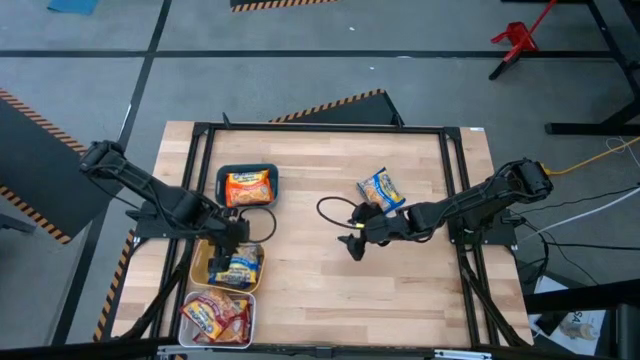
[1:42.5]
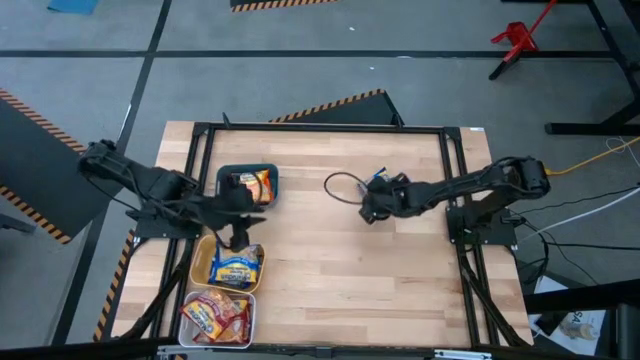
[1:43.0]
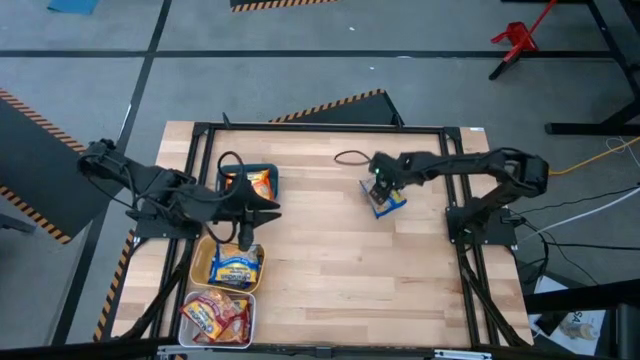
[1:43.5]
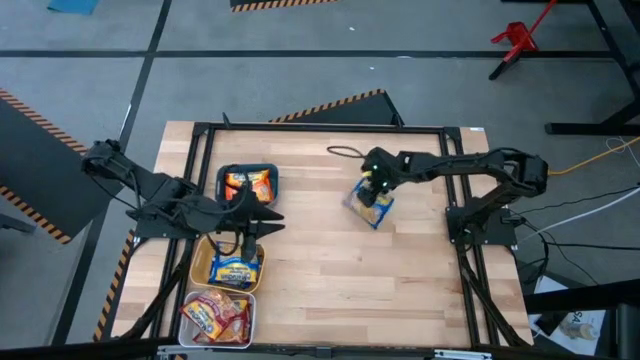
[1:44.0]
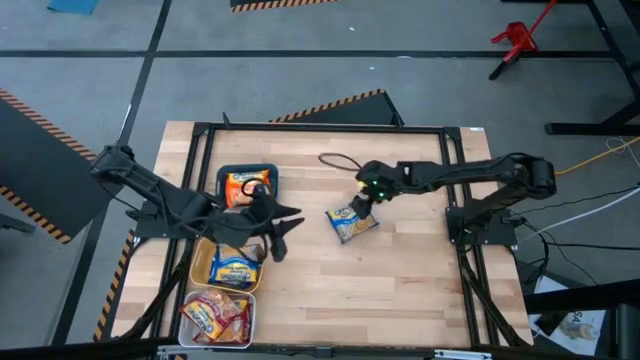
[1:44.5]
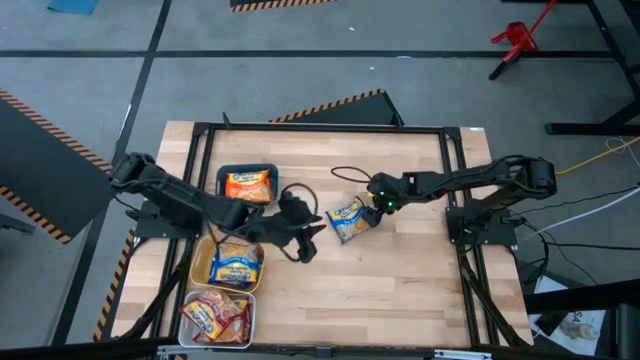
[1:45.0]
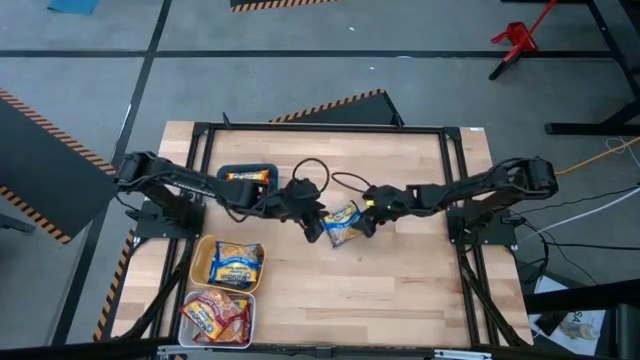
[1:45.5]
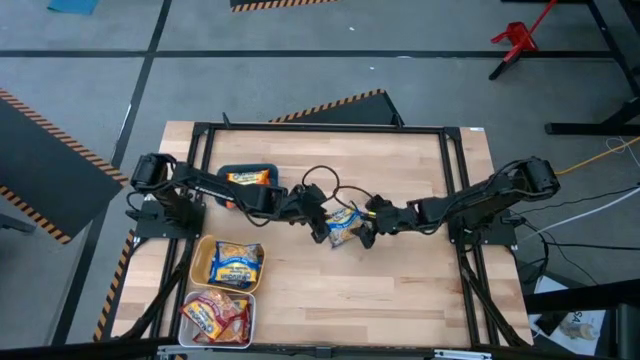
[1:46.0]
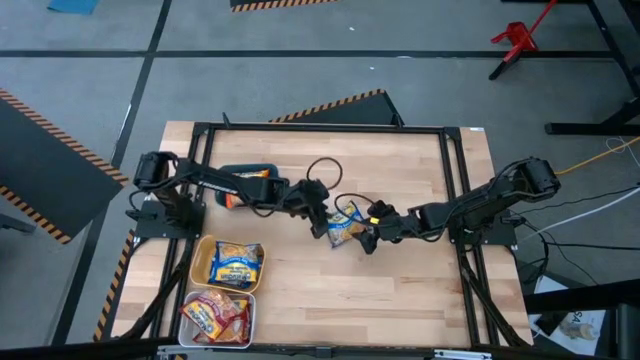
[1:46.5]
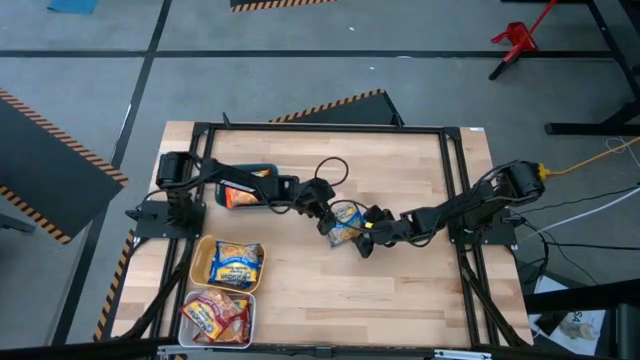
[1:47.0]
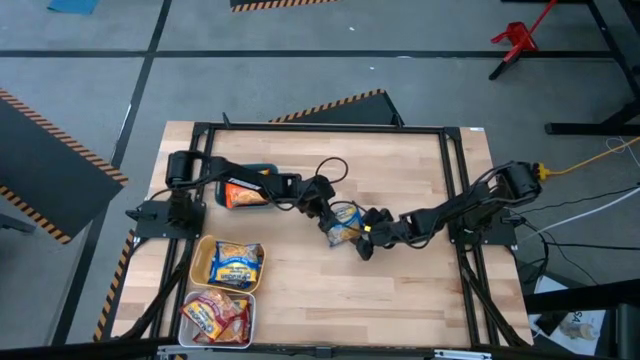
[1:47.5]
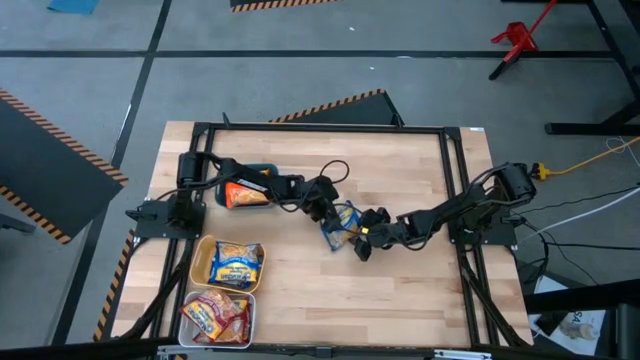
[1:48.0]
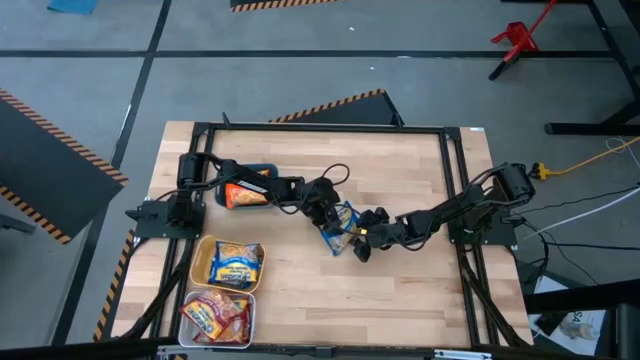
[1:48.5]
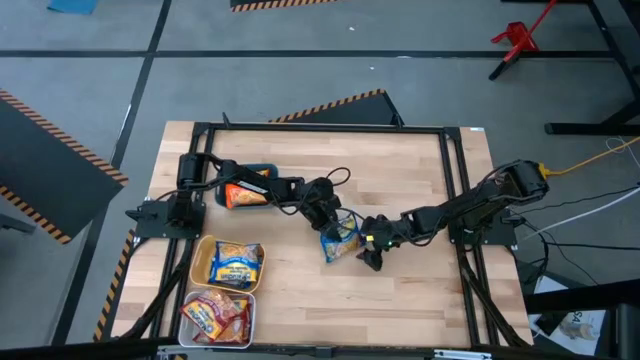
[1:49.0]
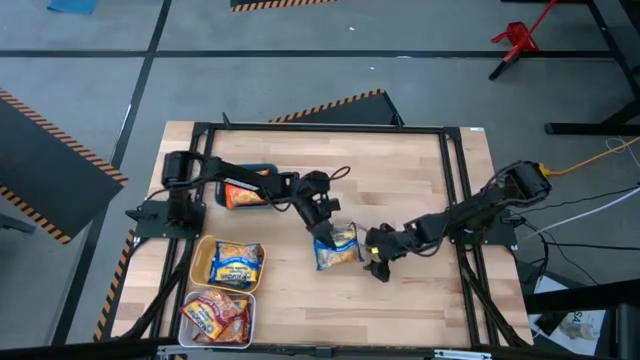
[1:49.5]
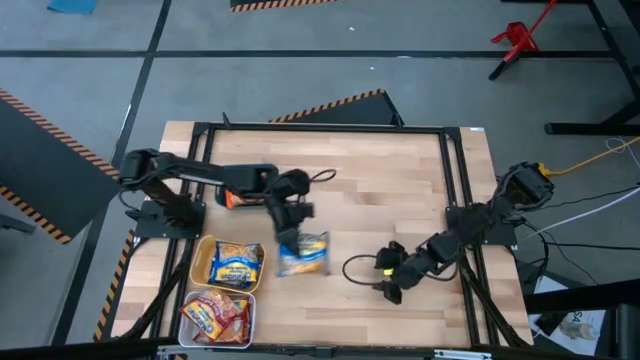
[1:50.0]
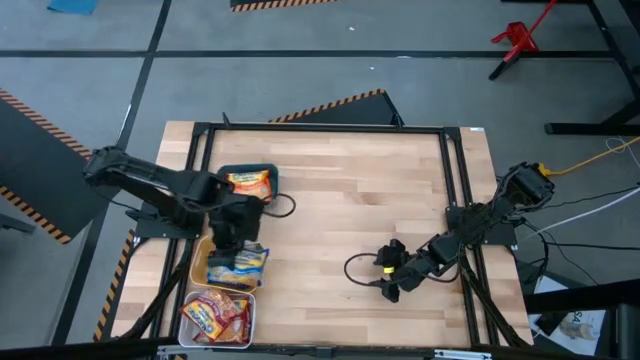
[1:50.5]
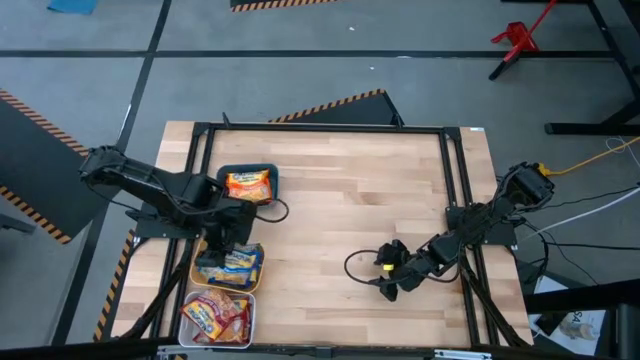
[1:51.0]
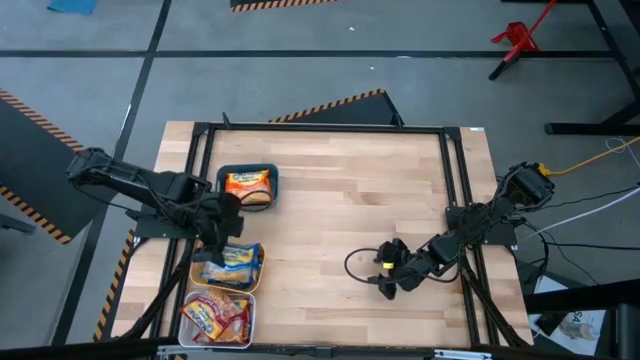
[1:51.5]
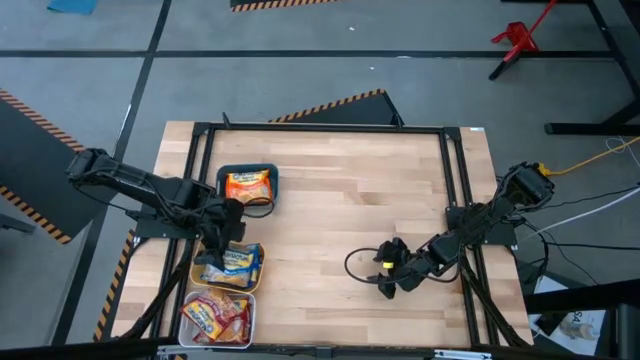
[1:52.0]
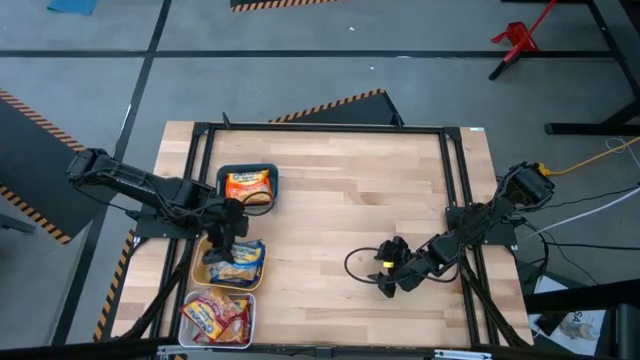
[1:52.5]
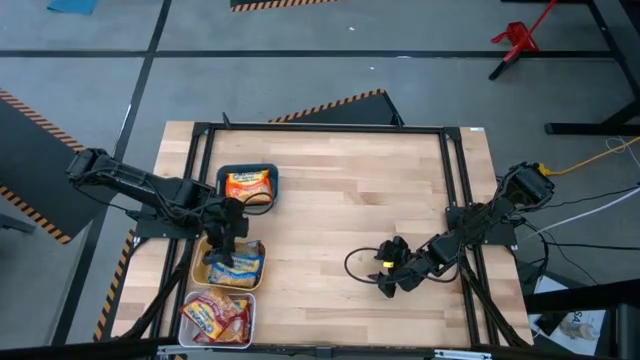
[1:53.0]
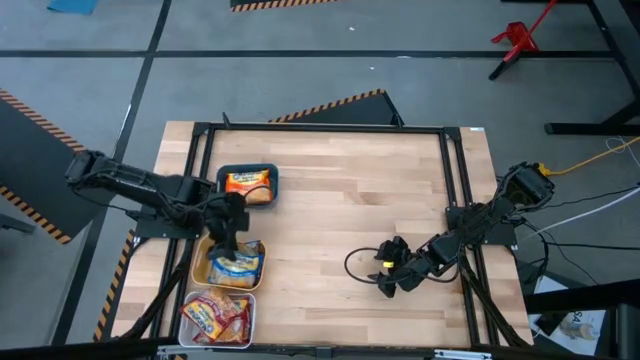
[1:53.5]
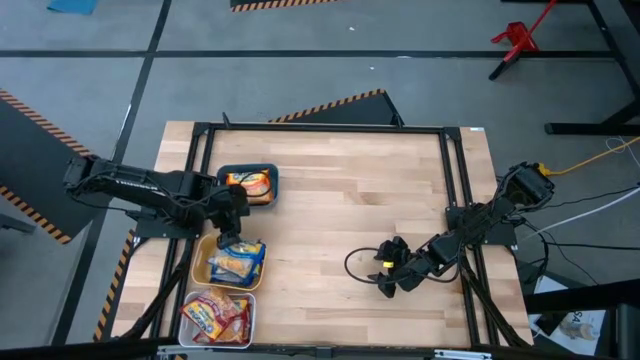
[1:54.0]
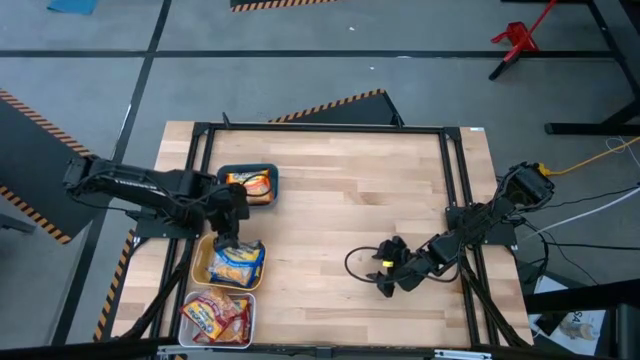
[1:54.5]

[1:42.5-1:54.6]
Task: Sort Maruchan noodles
Put the blue noodle pack into the yellow bin

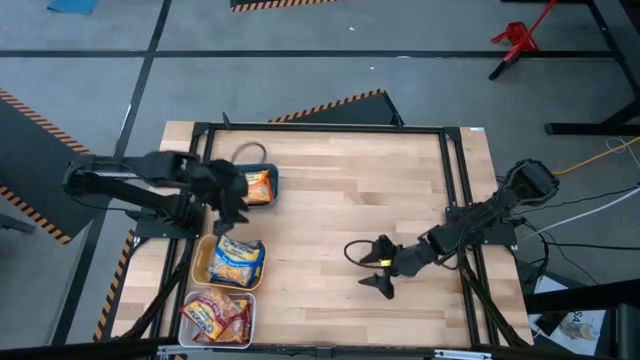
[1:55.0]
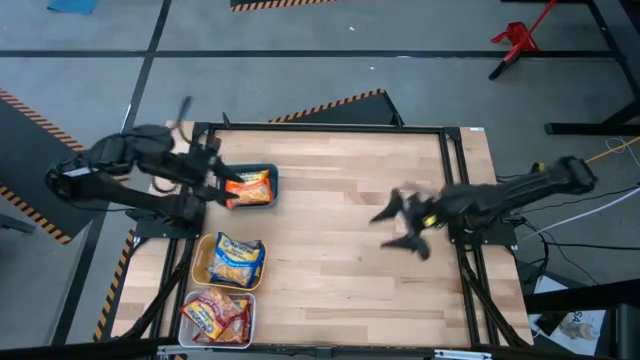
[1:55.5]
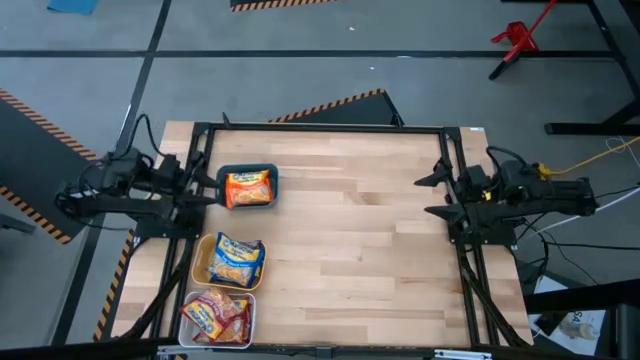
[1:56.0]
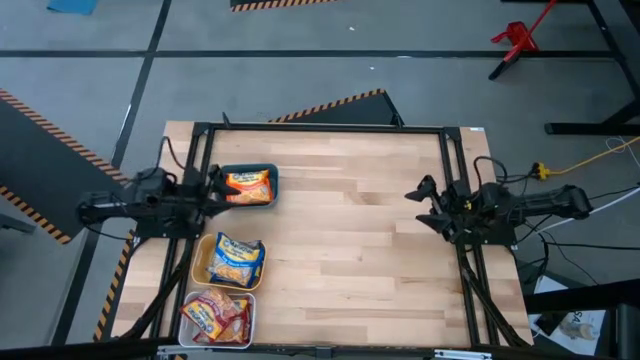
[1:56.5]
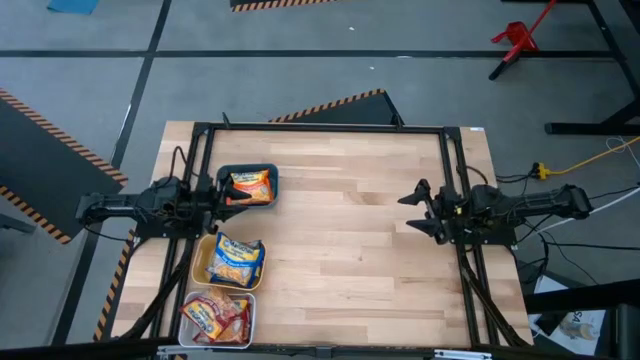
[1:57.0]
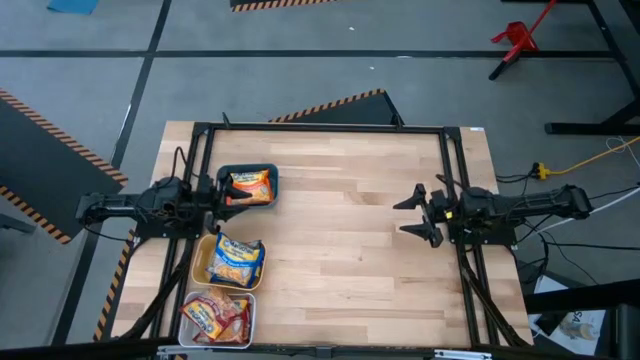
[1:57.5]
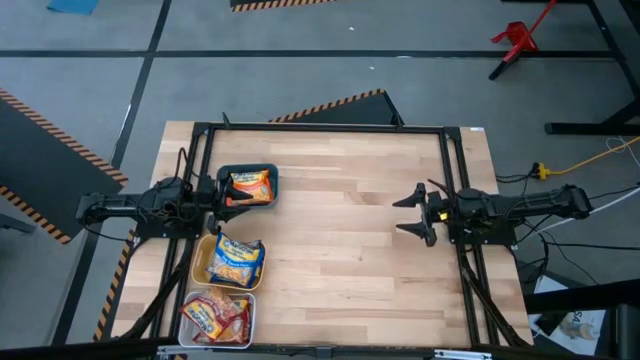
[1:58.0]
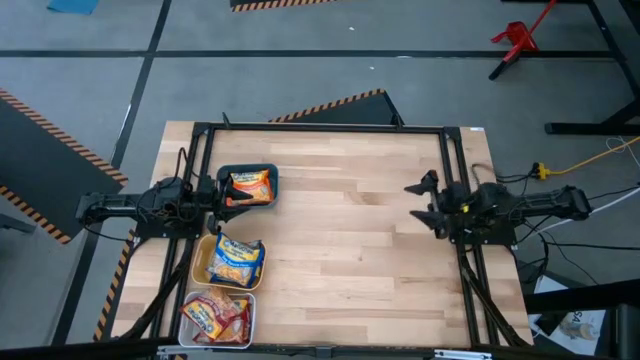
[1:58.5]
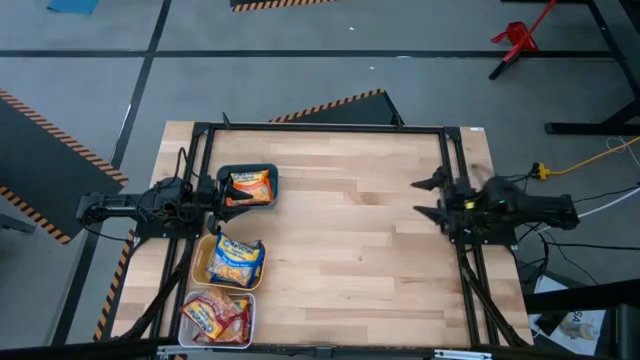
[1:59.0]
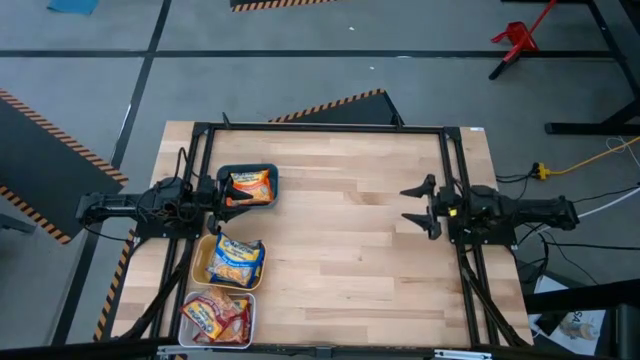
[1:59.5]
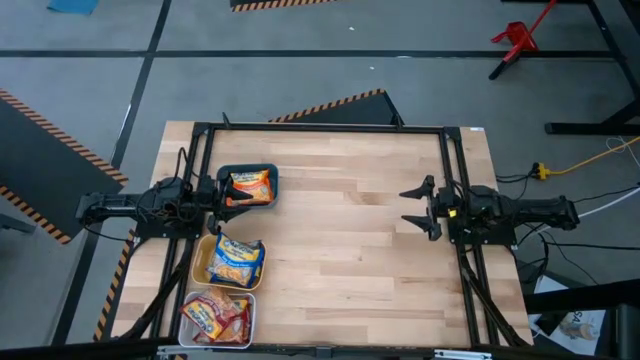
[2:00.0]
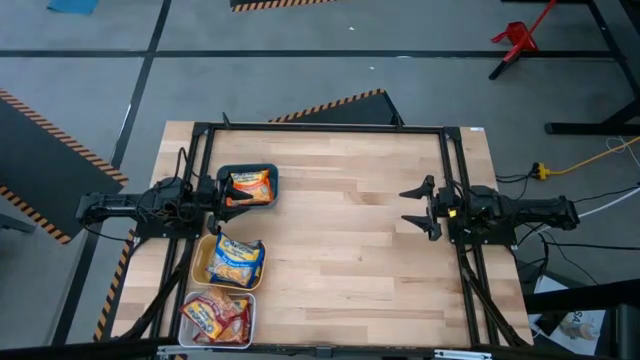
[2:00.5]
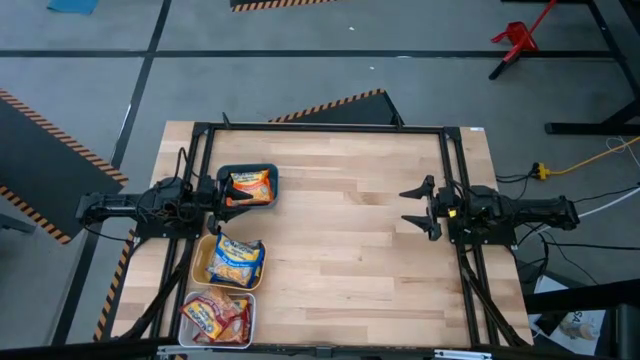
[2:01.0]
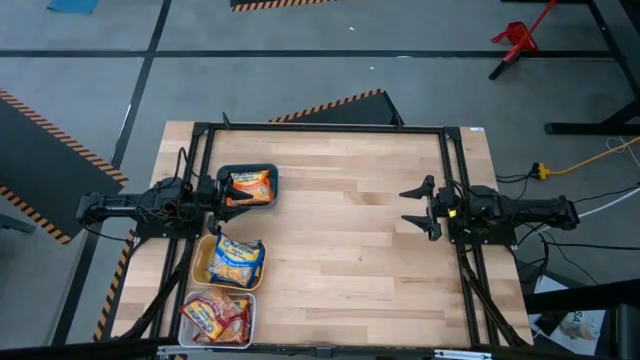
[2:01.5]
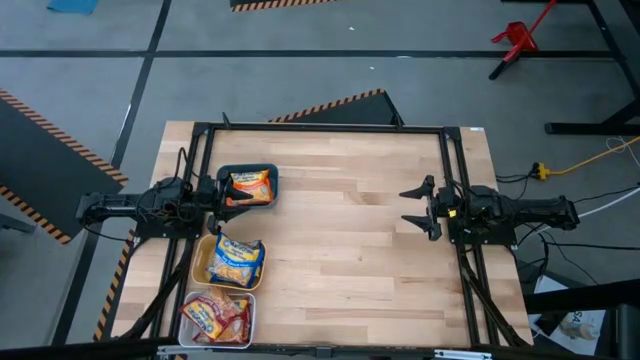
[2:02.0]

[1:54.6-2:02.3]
Return to Home Position

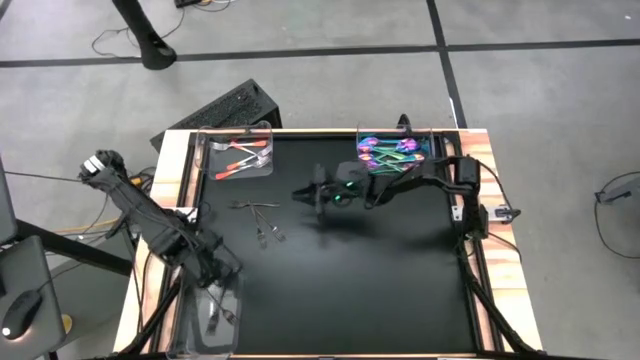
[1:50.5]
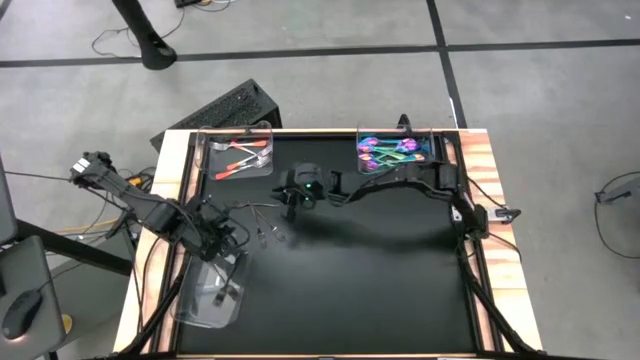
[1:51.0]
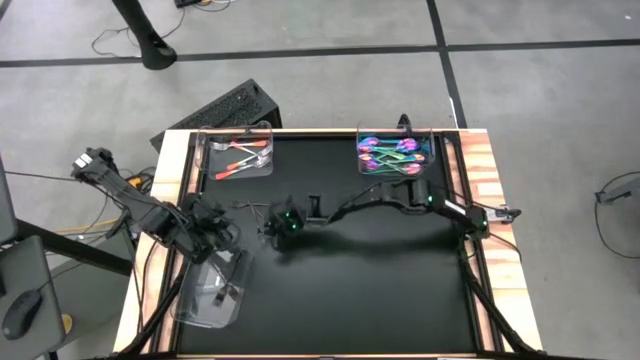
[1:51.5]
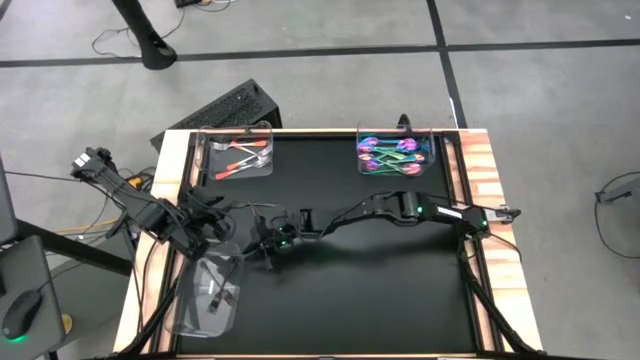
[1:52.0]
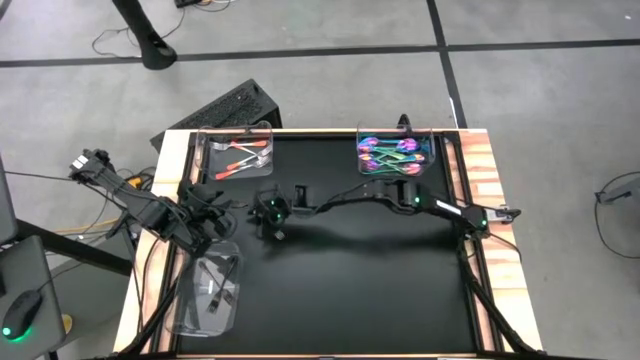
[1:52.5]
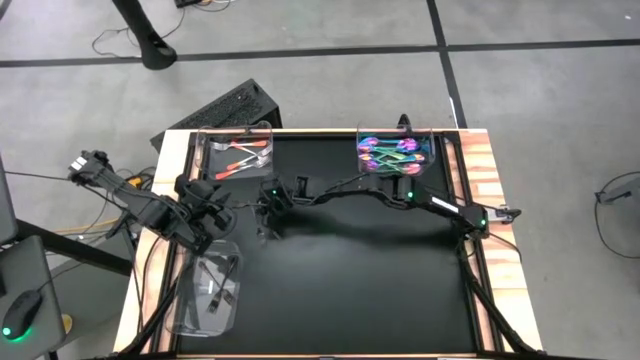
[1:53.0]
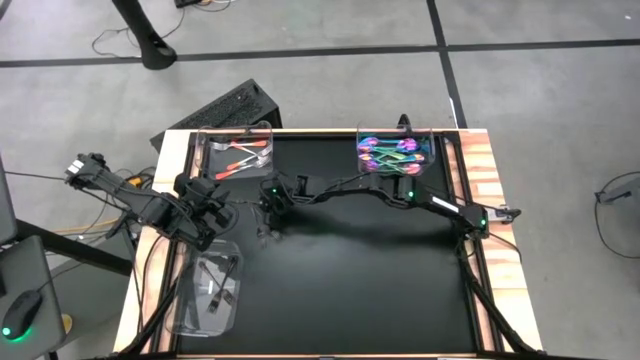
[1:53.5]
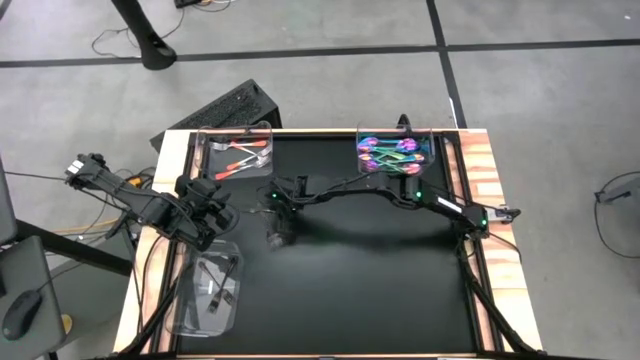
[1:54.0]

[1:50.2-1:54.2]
Task: Sort silverware by color (type)
Put the black fork into bottom transparent bin
